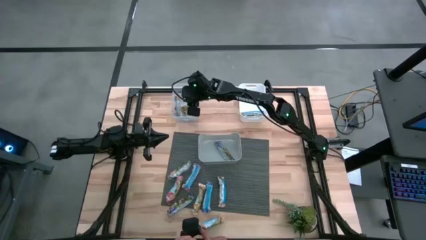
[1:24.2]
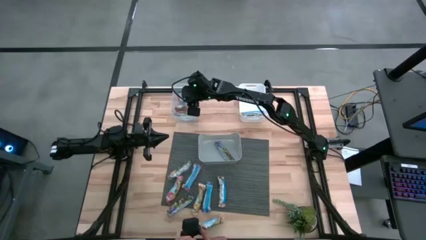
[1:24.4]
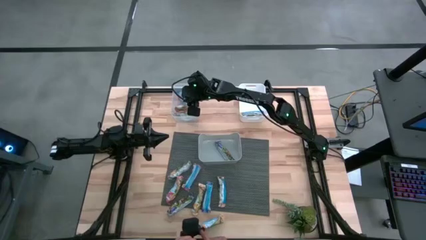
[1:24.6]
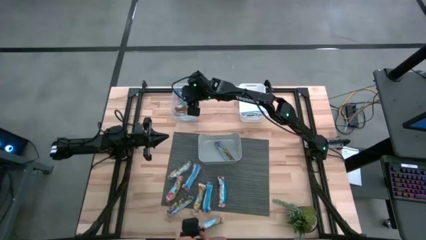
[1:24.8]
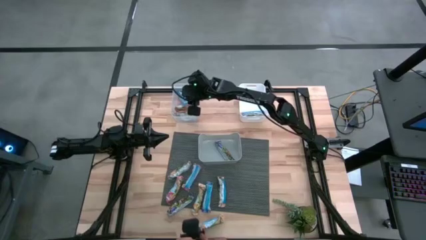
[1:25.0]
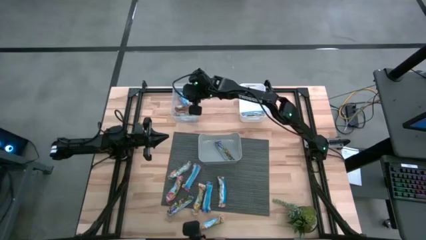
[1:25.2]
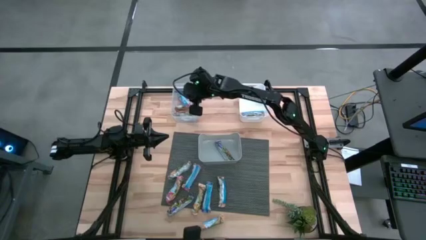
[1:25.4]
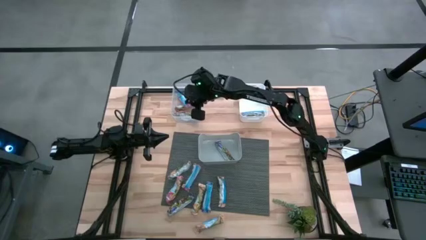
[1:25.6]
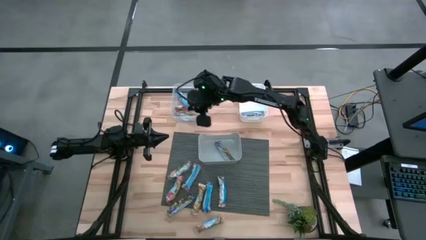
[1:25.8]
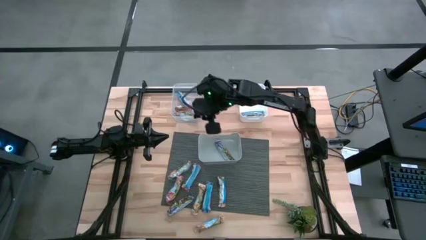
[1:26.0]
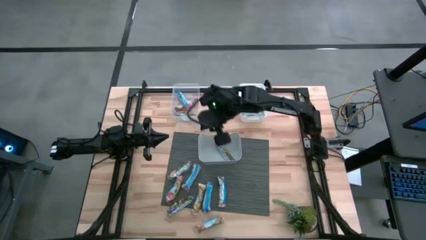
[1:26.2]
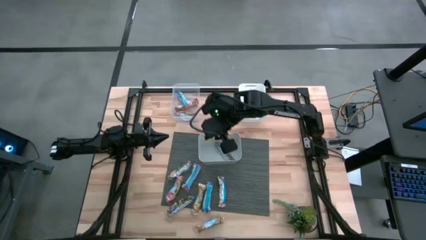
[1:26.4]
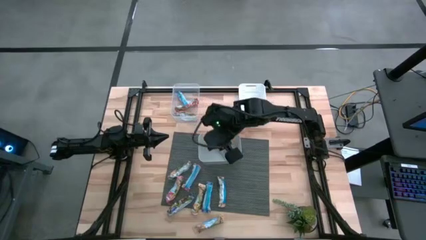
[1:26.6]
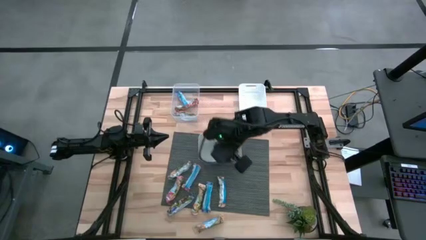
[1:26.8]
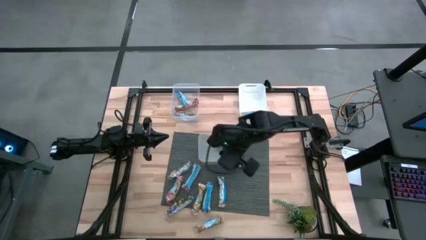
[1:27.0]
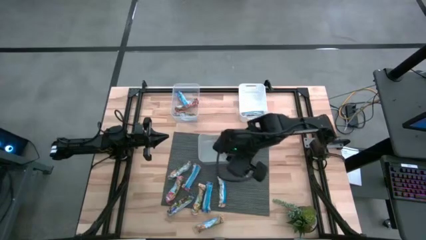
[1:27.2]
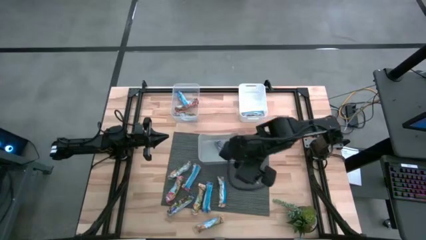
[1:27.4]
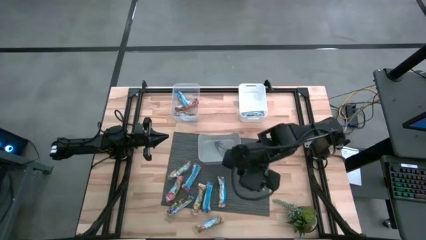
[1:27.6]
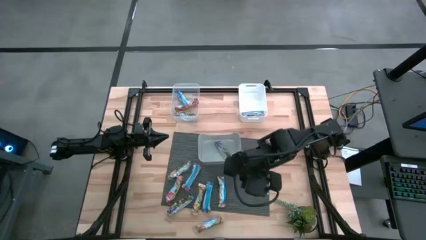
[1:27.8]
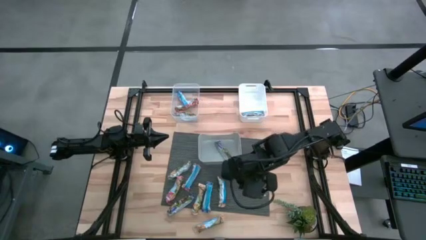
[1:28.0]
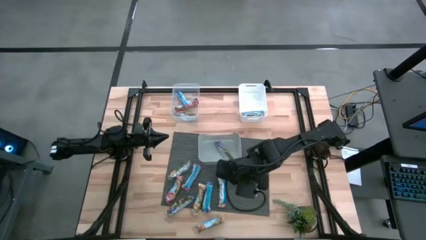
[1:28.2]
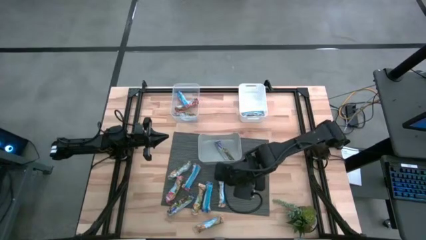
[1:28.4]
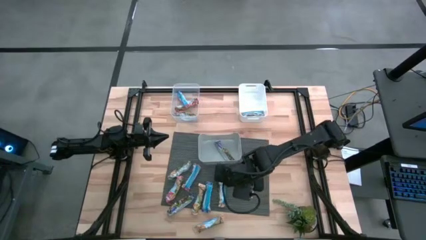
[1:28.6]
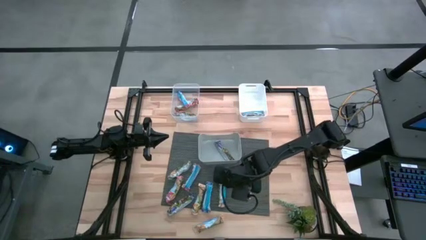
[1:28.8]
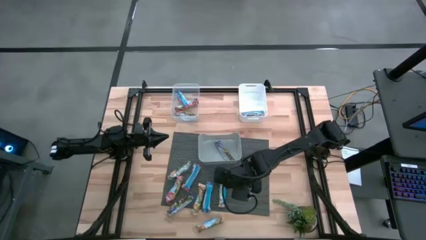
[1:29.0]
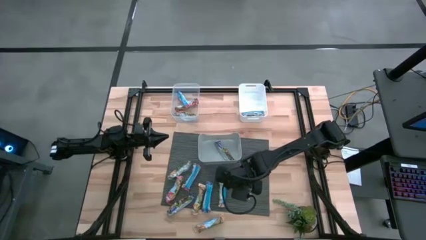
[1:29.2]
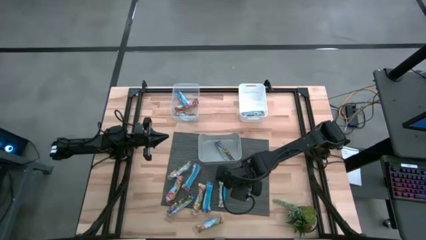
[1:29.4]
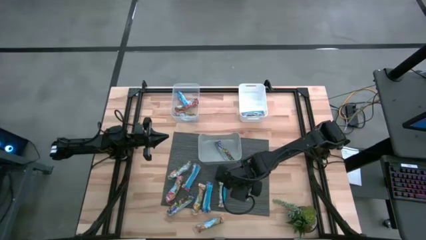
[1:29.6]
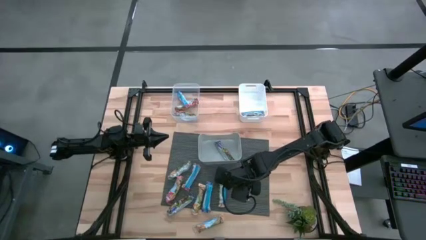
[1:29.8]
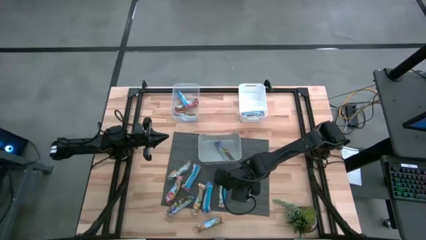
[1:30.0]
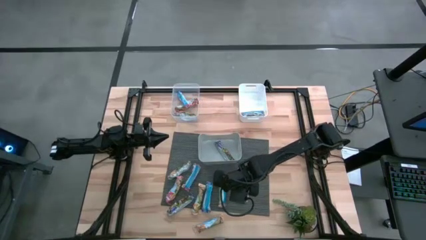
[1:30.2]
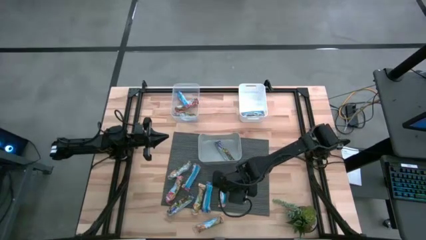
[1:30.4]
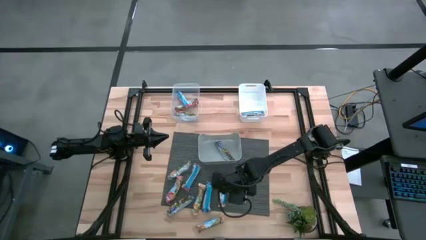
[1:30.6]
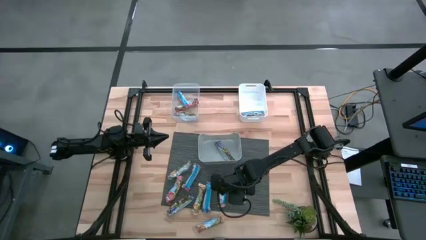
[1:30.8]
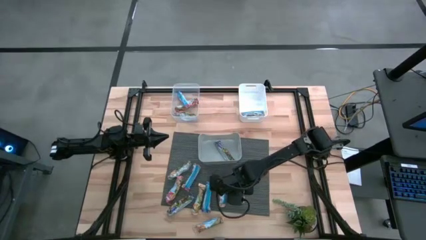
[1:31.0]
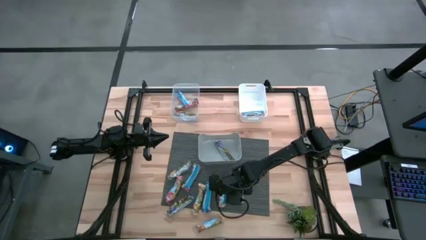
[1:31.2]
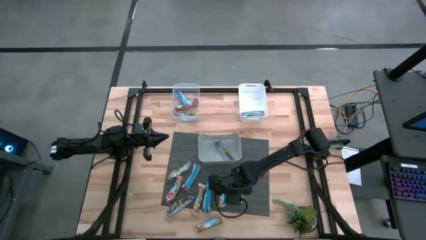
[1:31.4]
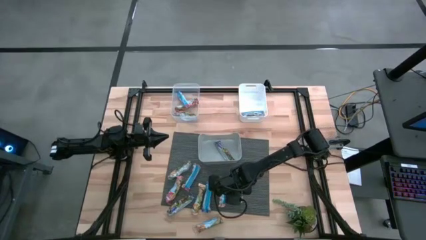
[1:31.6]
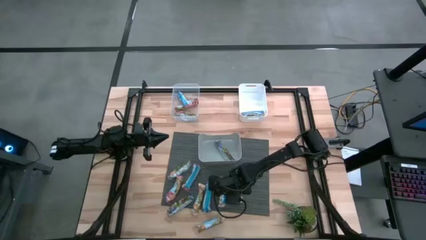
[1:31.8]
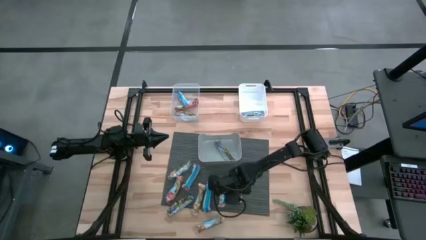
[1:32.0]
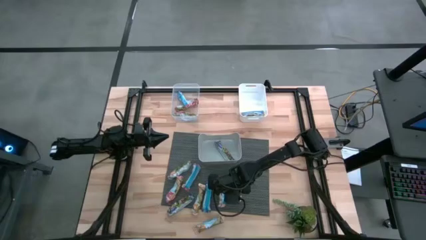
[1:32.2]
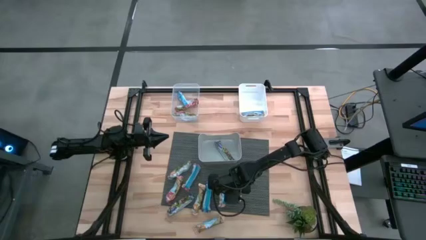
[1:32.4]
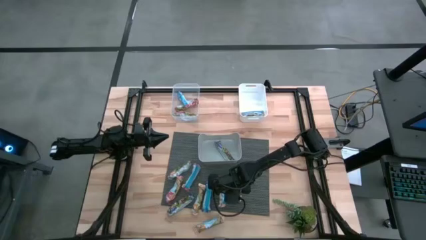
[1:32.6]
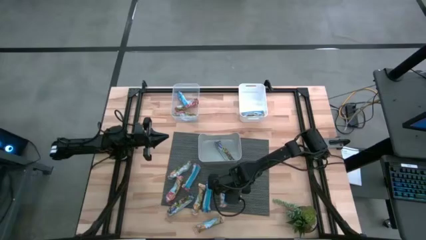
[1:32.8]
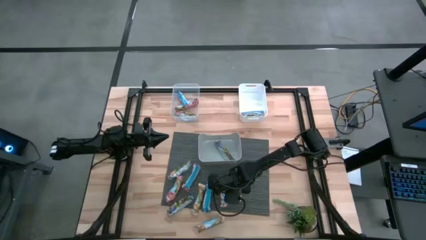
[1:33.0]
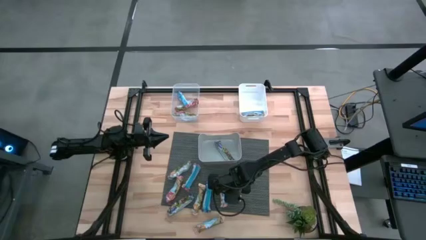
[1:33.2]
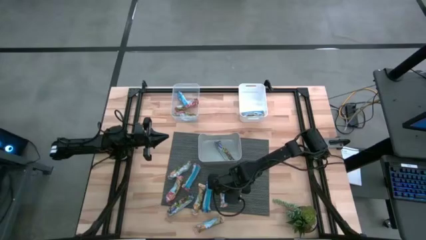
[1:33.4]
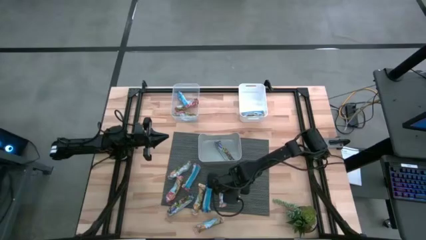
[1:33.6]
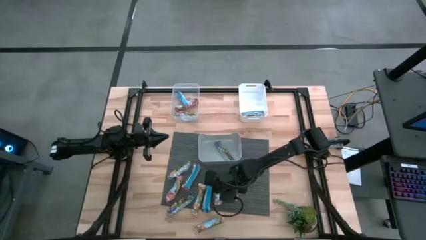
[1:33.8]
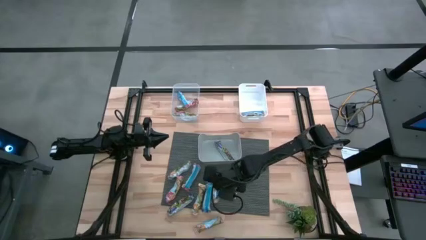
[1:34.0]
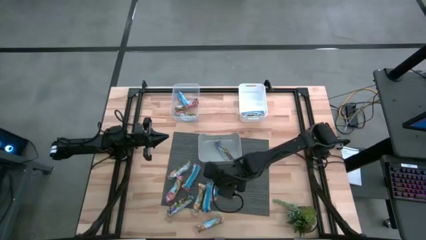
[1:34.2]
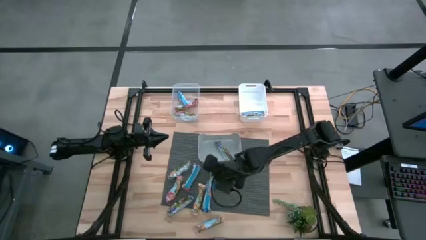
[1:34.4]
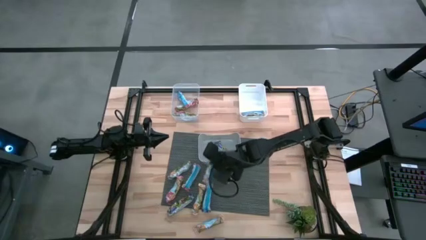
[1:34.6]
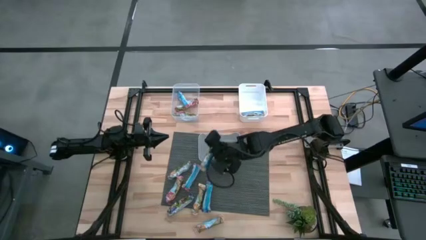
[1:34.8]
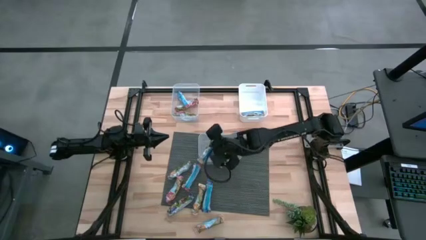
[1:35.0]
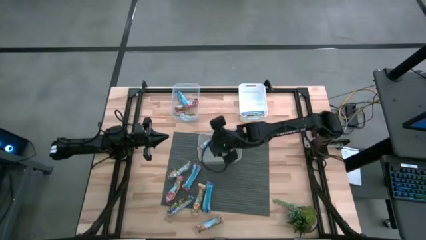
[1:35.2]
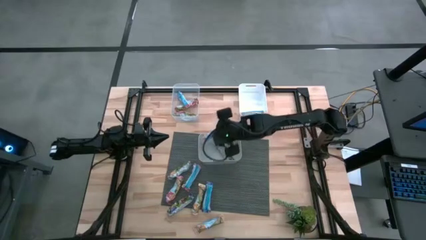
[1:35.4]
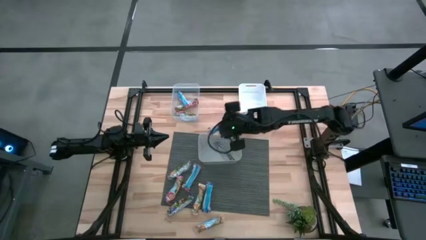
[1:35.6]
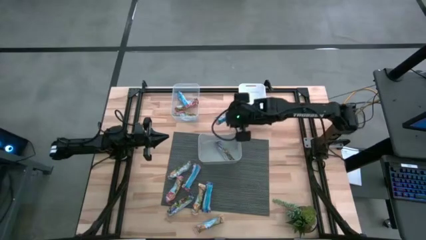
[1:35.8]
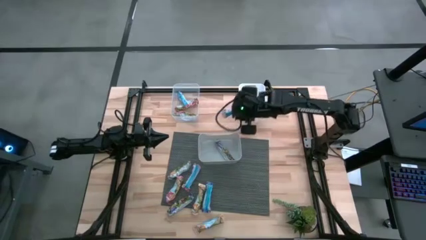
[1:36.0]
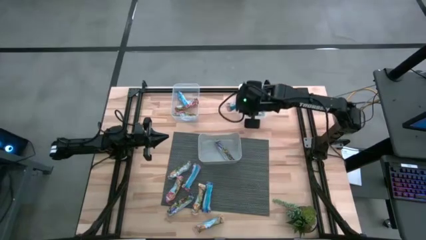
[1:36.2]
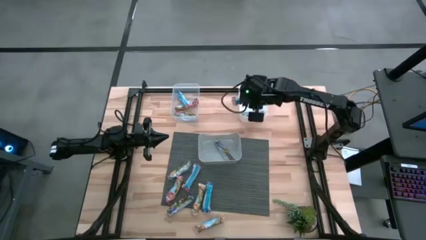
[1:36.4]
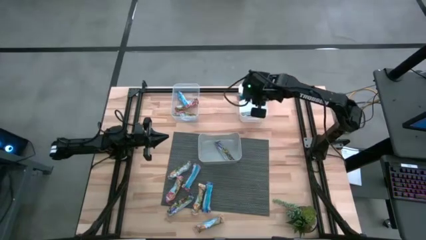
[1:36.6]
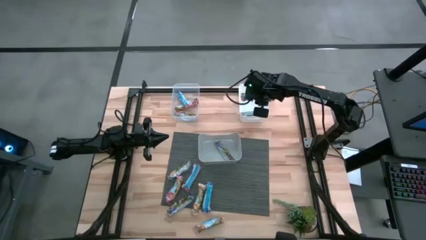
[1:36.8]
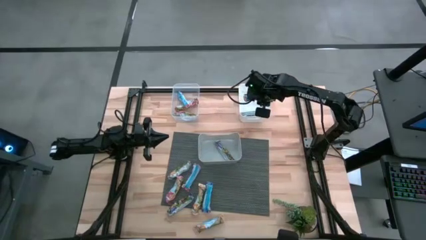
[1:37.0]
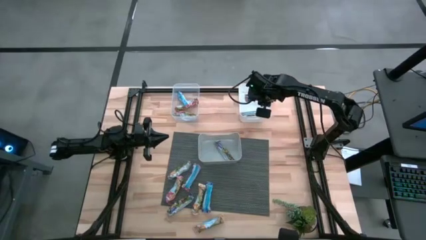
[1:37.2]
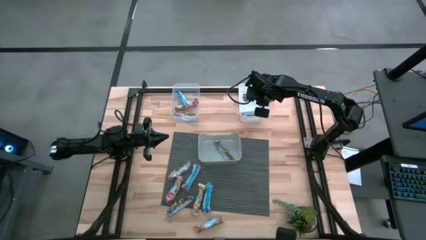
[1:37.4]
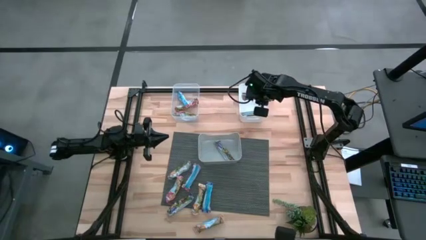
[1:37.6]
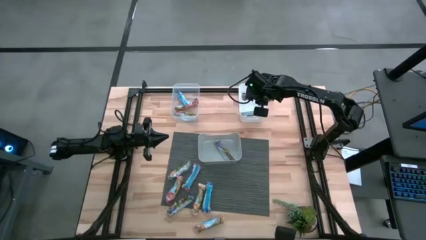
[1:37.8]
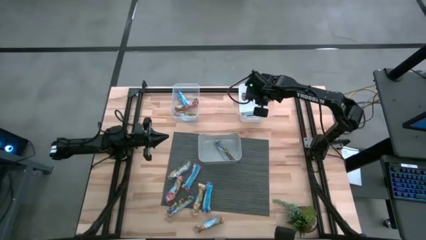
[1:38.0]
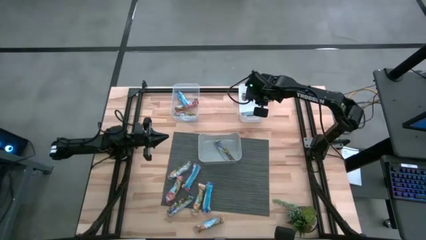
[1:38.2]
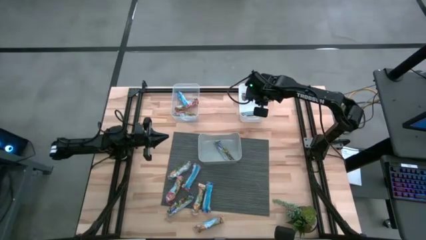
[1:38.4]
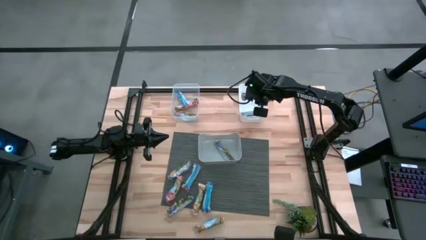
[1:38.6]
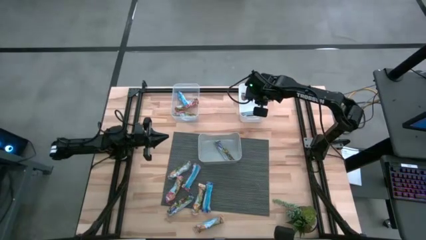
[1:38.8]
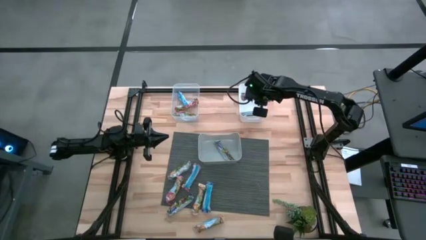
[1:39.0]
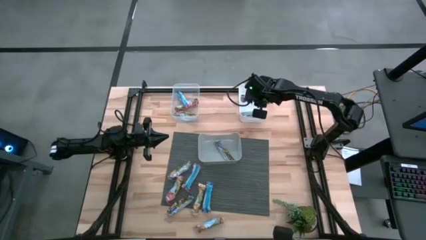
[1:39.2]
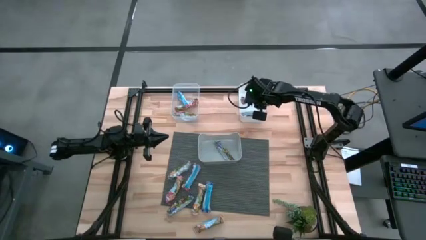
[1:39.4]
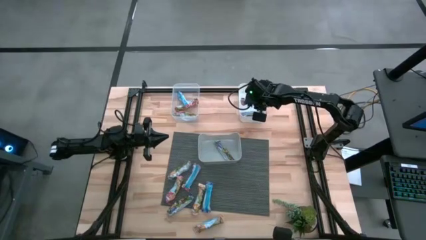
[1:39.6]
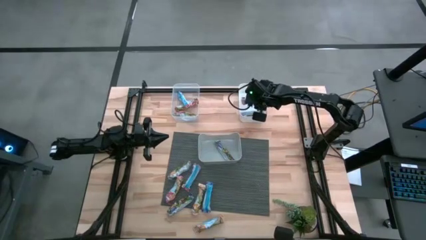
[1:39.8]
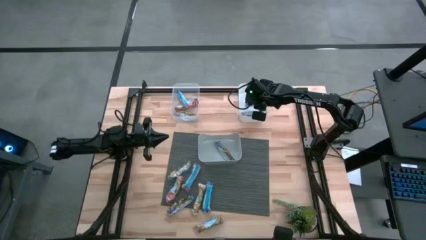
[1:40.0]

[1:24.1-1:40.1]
Task: Pick and place Granola Bars by type
Put the yellow granola bar into the white bin
